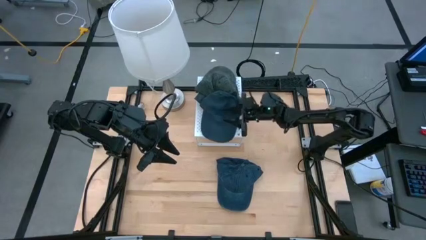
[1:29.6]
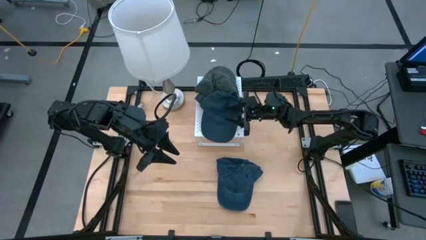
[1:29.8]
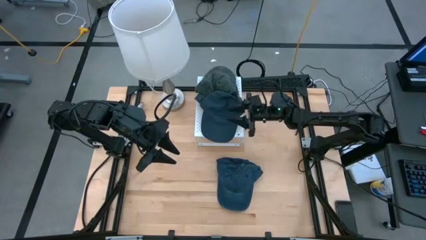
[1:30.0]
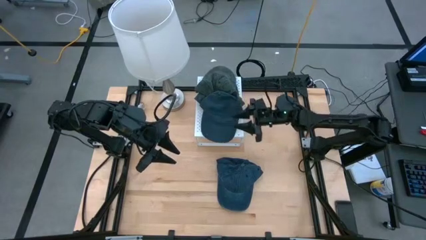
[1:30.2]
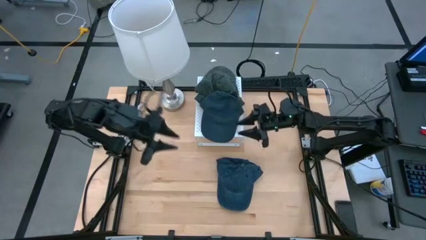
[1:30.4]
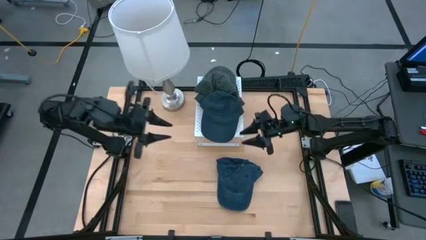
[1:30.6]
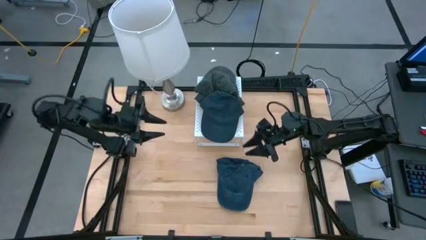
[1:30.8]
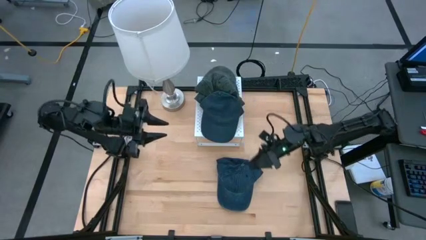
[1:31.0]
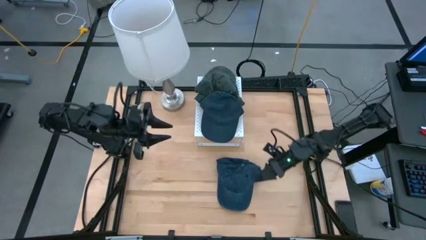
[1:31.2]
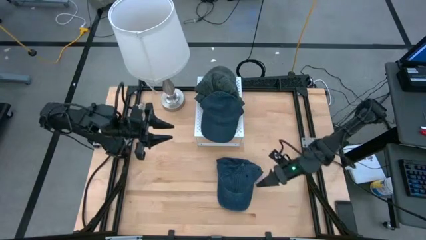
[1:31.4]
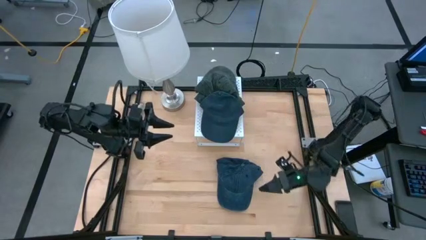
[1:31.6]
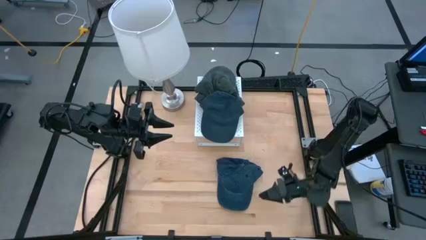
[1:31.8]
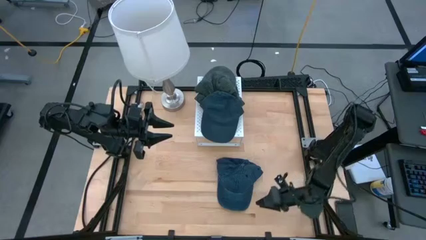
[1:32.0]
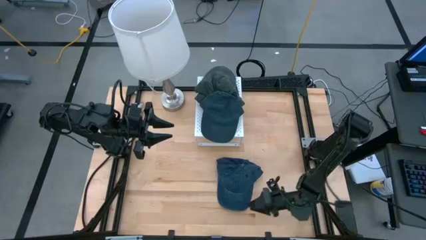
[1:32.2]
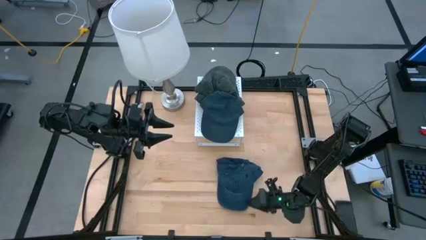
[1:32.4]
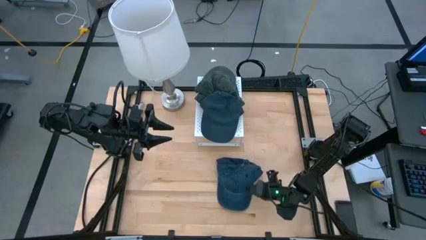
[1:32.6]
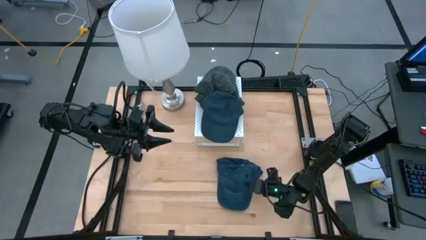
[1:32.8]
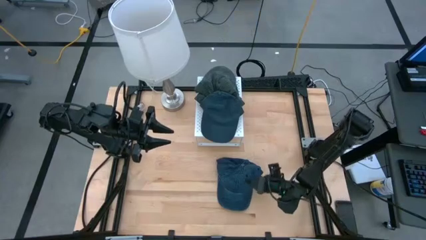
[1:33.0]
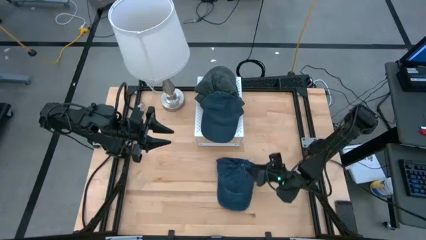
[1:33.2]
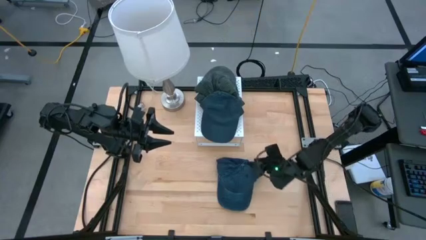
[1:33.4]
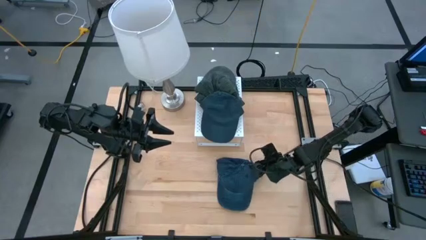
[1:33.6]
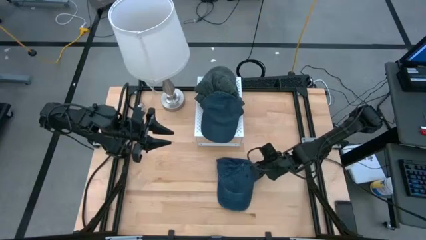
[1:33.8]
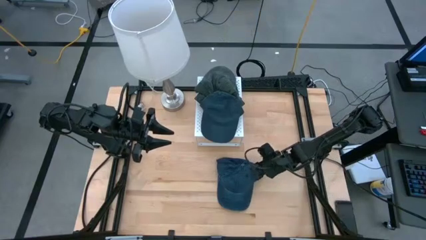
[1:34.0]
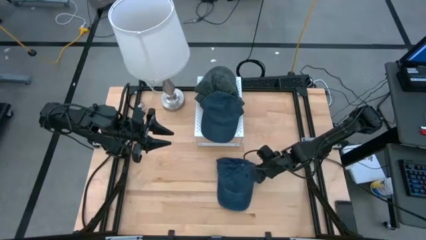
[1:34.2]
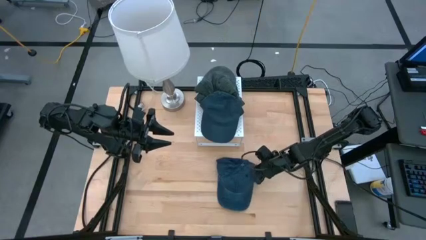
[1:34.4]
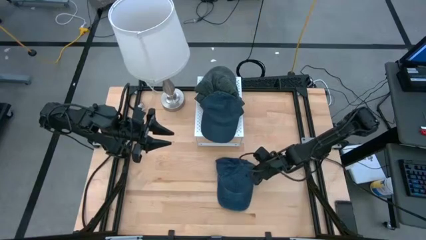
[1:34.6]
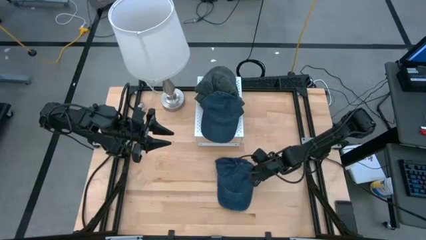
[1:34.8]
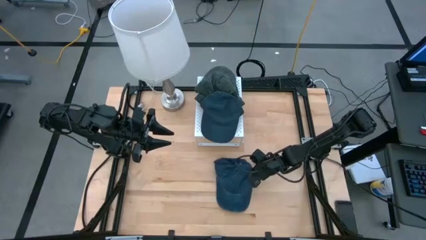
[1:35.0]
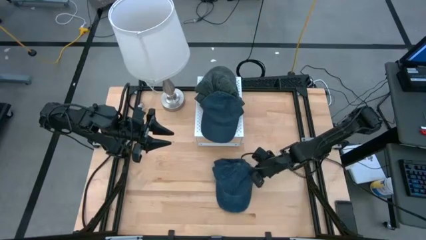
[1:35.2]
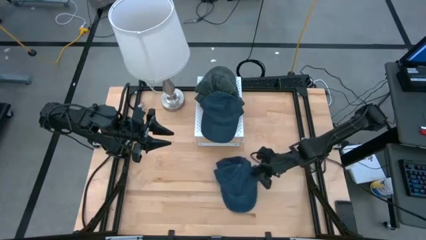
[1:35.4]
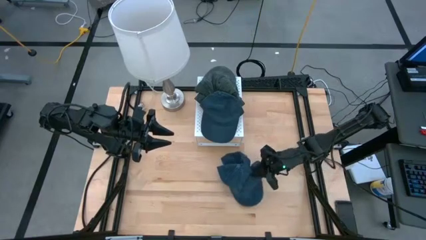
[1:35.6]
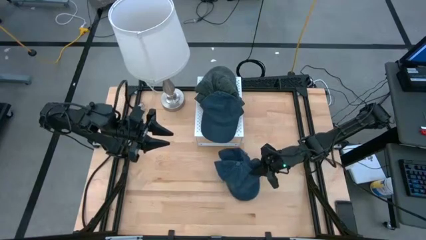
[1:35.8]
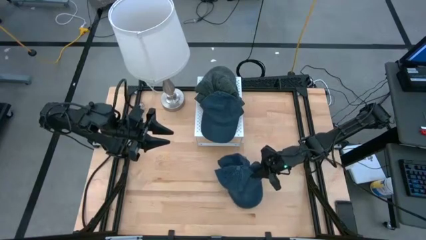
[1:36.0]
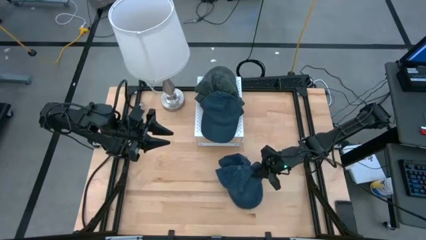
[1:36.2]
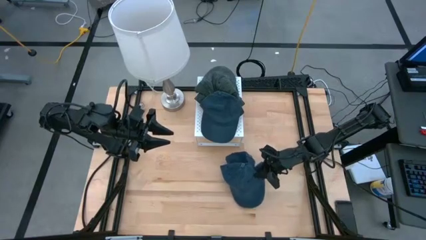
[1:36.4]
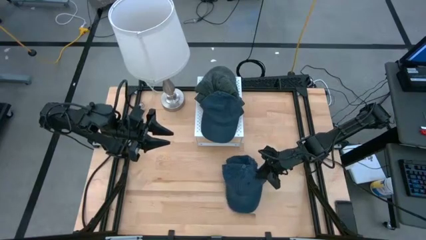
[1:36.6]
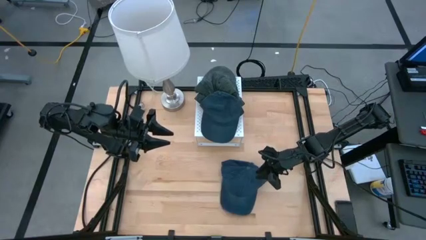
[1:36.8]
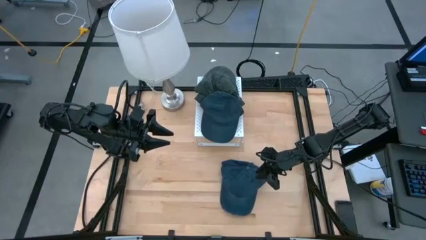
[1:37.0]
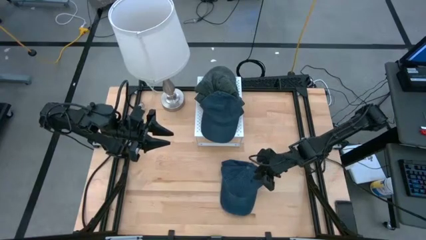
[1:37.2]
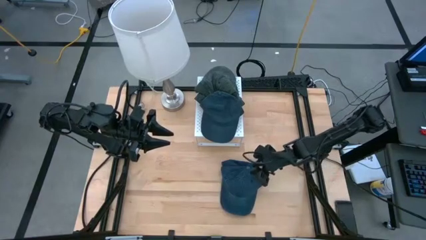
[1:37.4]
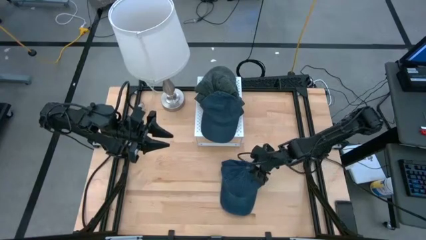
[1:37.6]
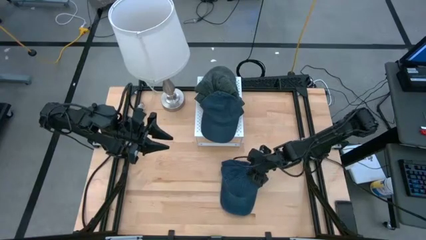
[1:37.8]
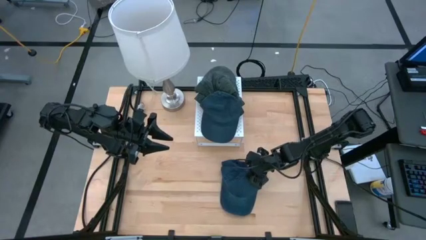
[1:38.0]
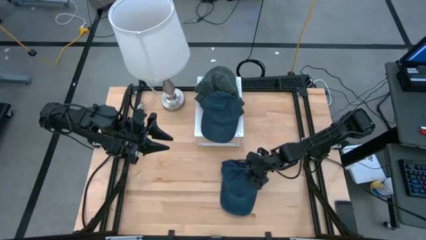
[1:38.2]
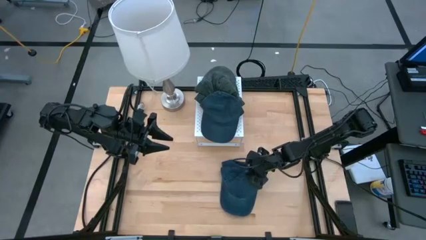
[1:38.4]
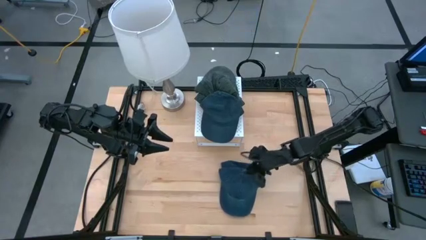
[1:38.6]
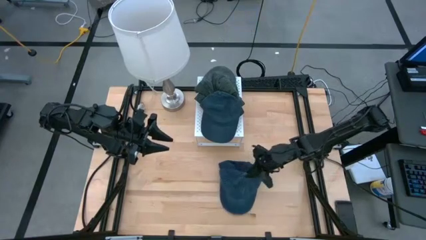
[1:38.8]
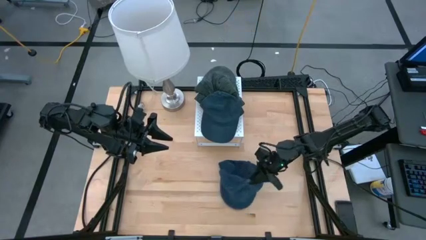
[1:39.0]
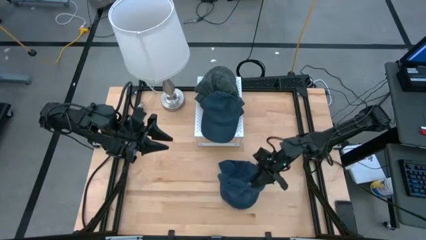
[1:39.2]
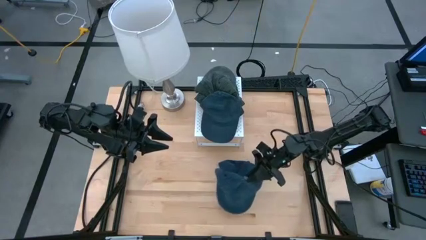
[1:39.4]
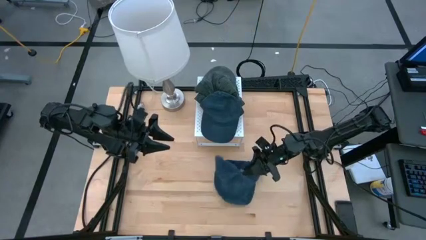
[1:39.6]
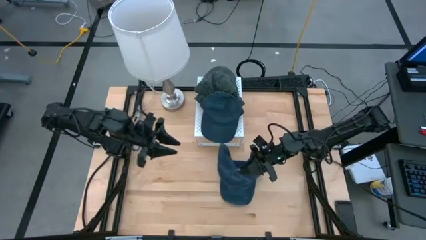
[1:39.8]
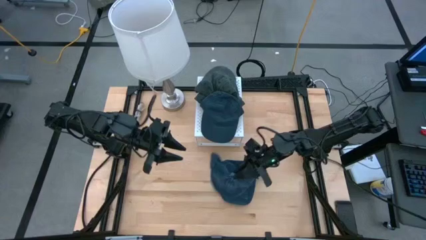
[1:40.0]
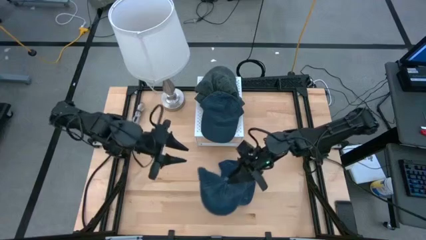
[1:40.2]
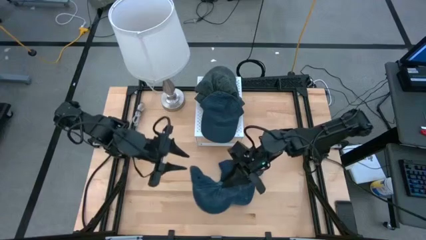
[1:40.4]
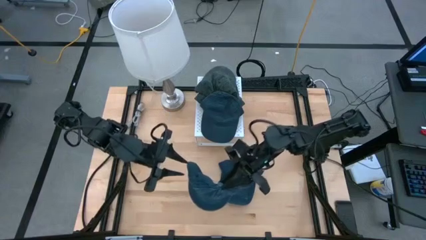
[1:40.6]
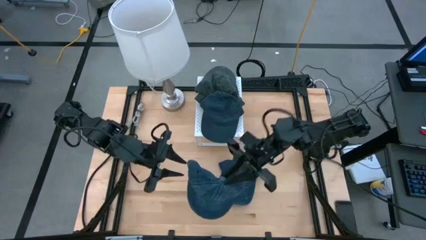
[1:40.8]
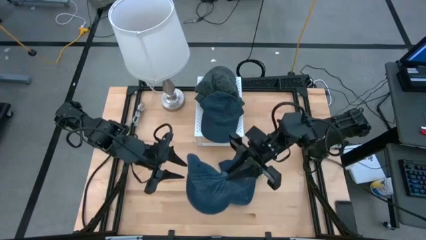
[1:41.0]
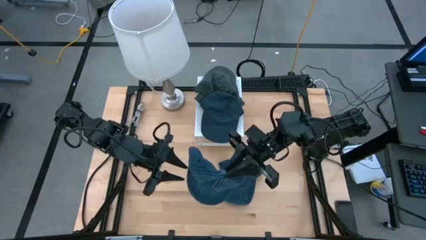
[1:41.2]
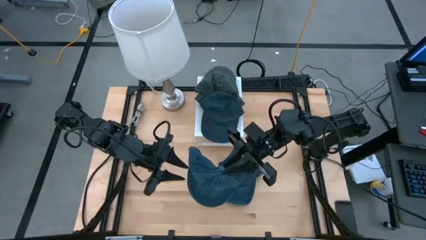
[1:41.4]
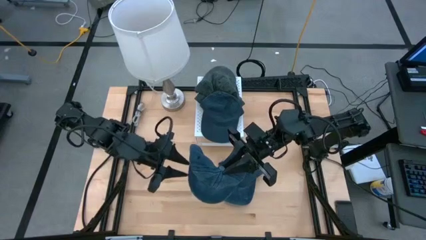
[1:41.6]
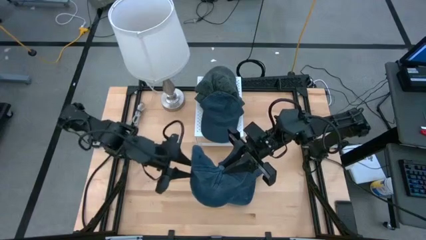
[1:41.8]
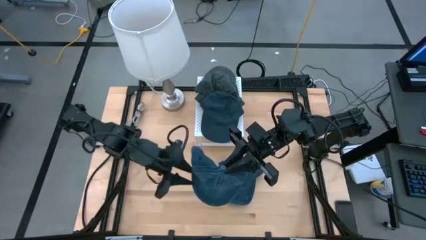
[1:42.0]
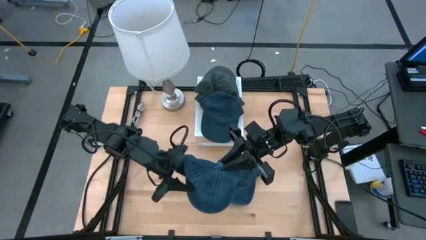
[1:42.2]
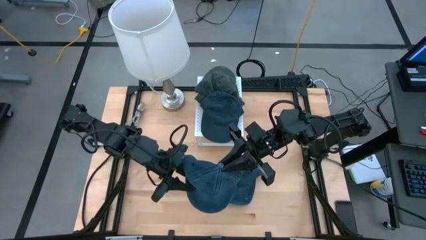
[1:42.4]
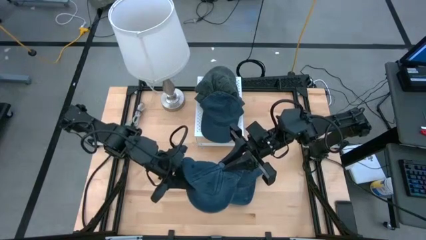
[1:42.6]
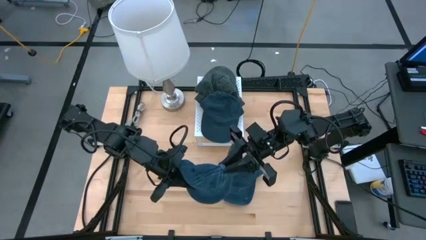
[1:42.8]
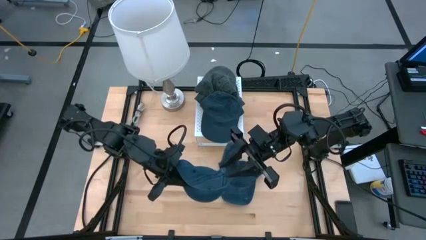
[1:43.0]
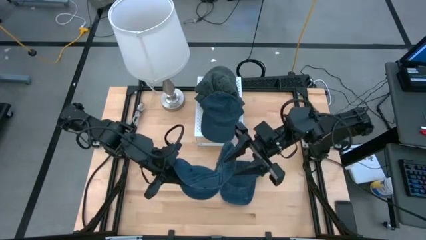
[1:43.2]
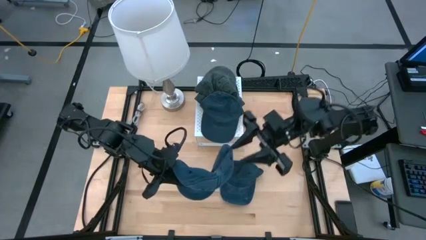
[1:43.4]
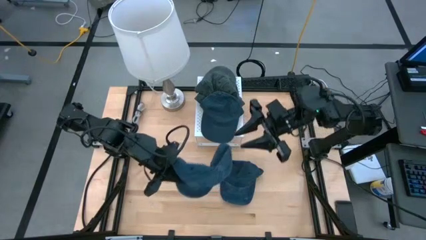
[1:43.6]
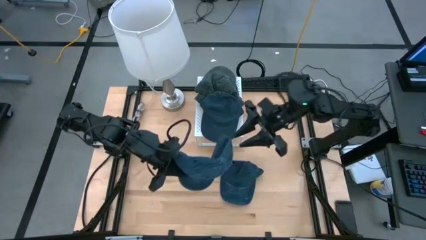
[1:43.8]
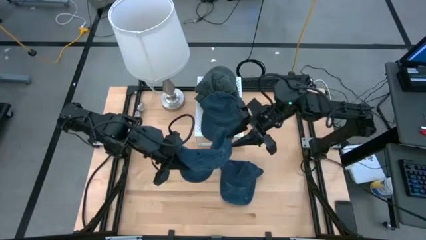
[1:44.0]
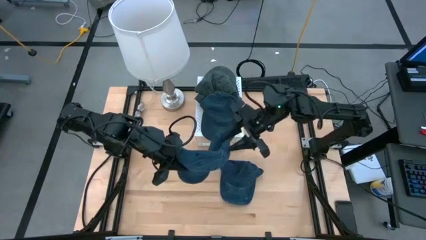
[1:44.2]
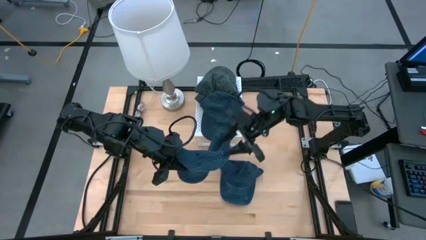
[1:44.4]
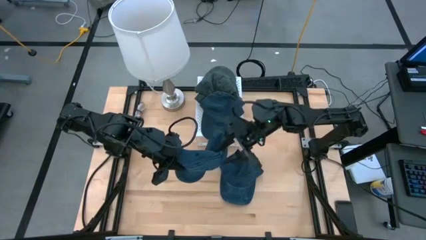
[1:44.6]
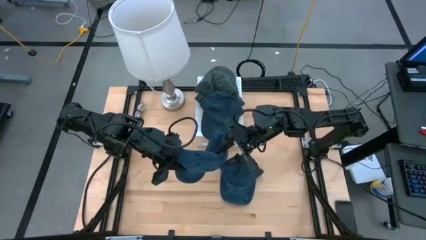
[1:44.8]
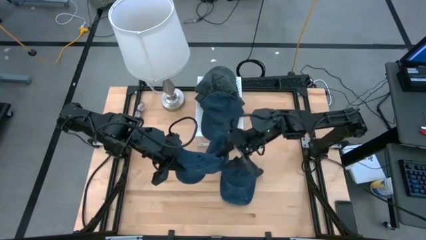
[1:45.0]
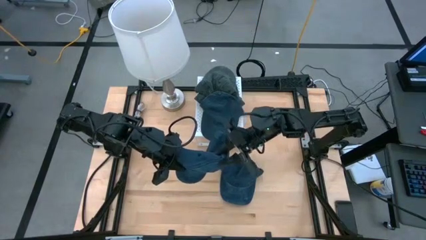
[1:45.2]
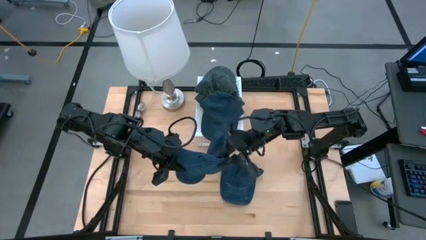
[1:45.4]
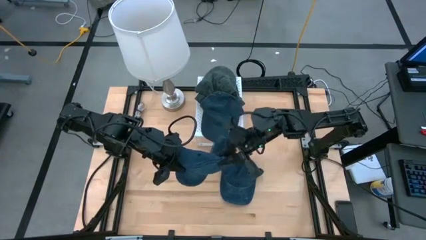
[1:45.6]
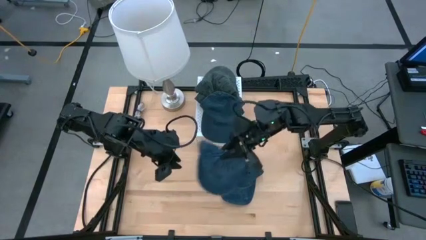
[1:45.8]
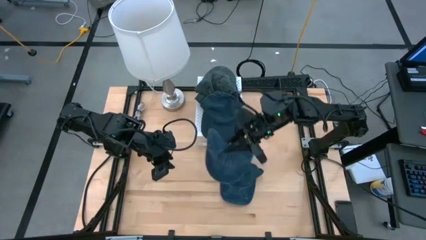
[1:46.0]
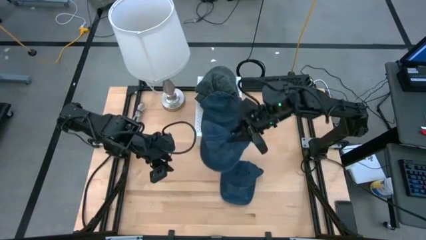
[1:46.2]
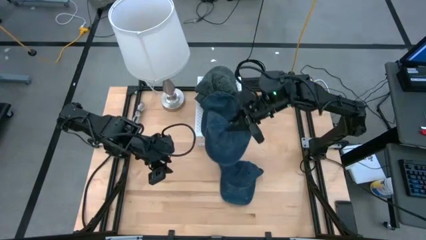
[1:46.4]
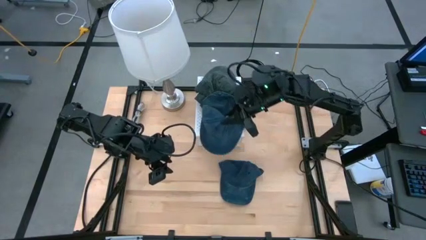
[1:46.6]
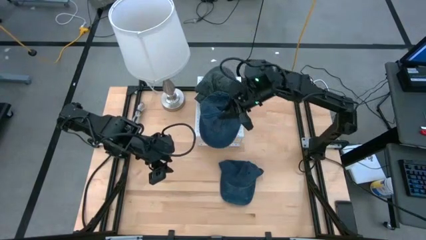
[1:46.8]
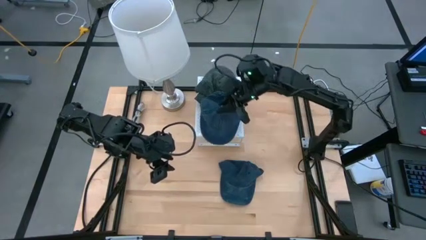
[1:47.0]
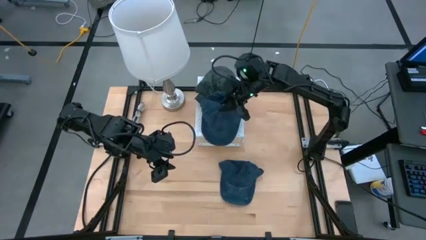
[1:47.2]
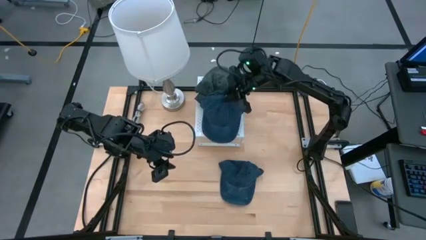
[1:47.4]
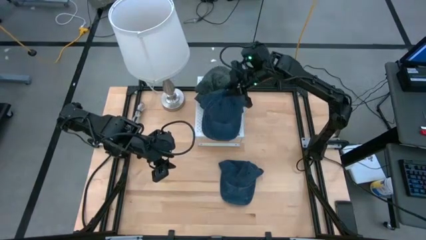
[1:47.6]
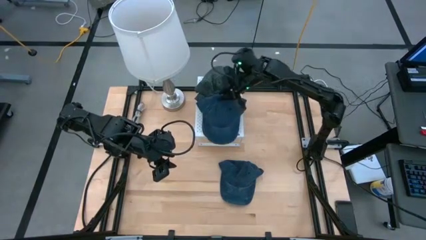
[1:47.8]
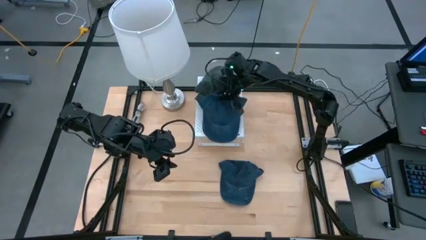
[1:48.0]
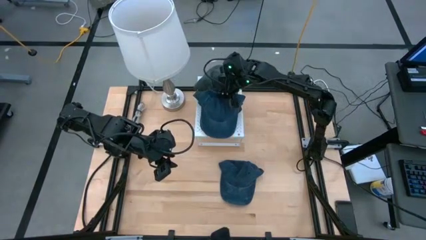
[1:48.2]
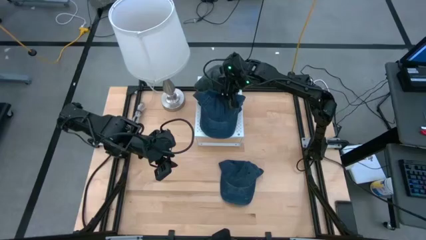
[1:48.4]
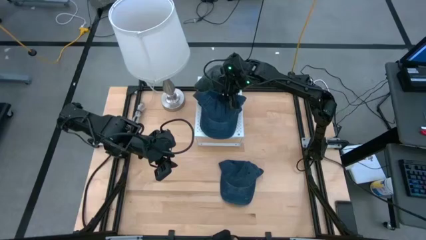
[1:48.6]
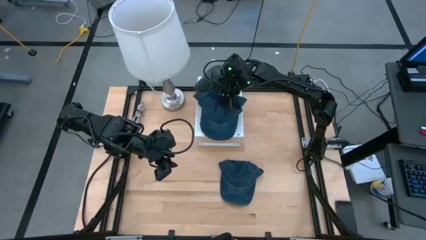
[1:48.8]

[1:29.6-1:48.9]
Task: Pick & Place hat
Stack the blue cap on top of the other blue cap on the shelf
